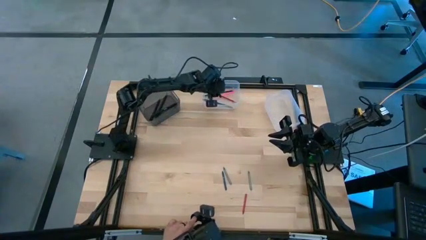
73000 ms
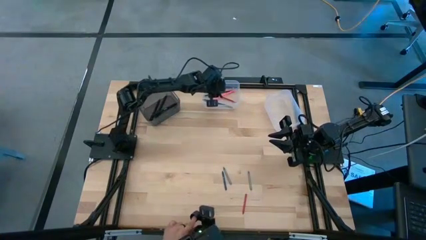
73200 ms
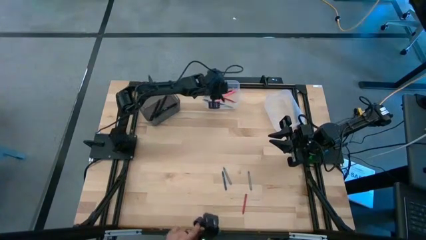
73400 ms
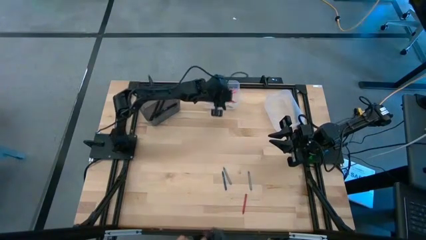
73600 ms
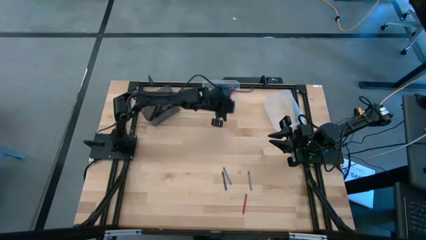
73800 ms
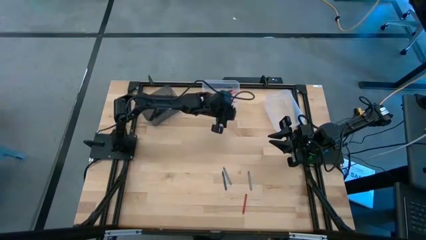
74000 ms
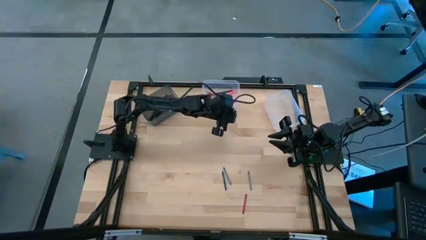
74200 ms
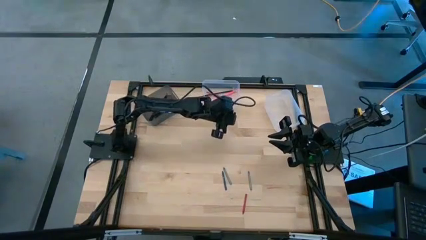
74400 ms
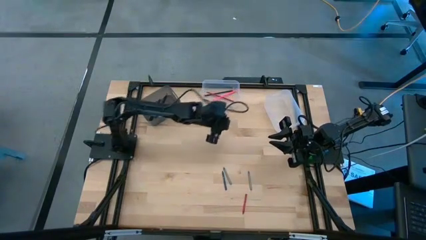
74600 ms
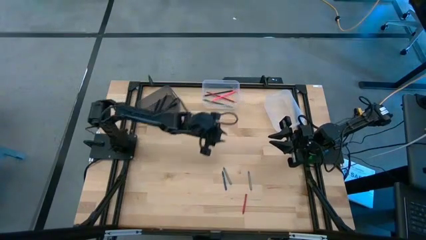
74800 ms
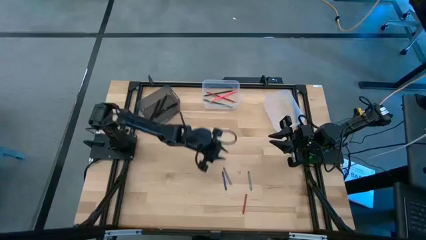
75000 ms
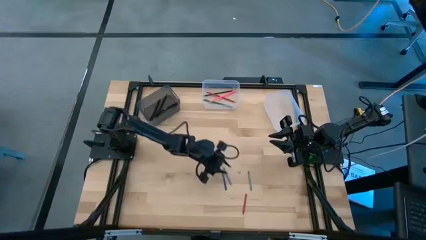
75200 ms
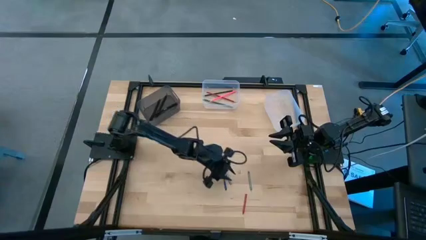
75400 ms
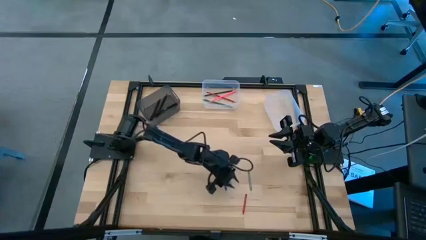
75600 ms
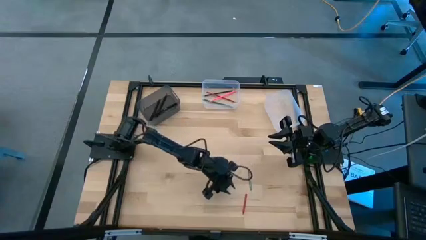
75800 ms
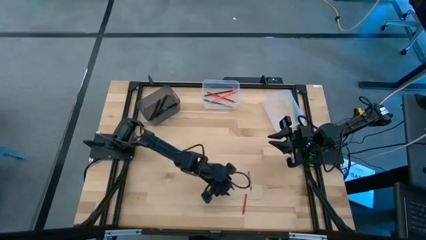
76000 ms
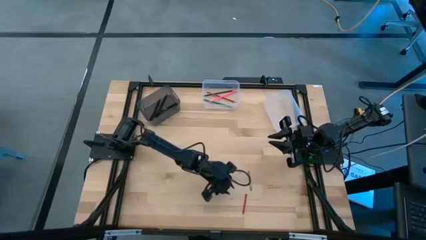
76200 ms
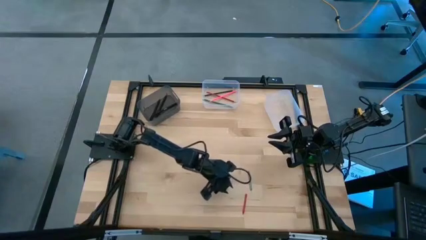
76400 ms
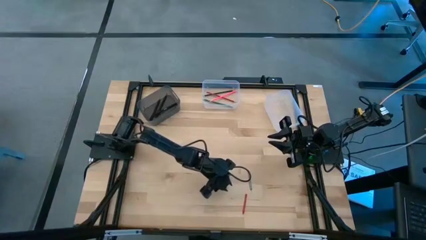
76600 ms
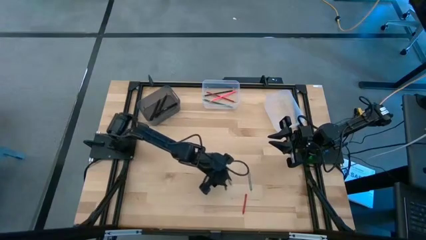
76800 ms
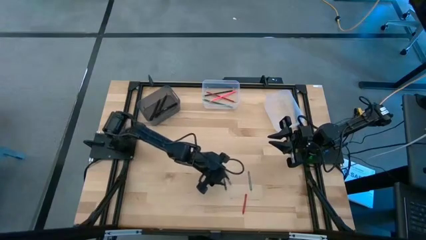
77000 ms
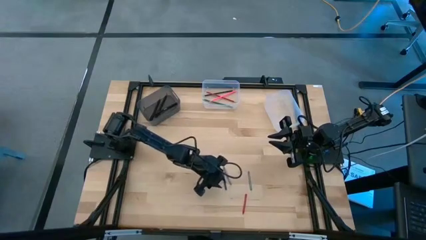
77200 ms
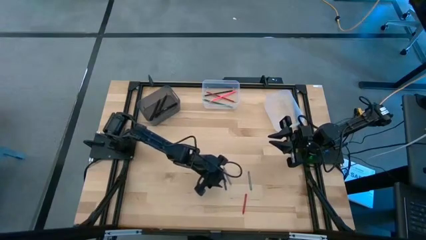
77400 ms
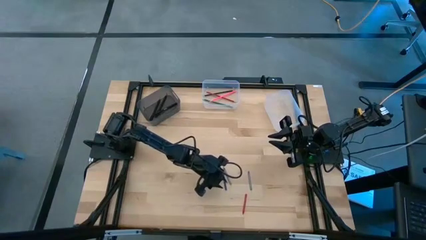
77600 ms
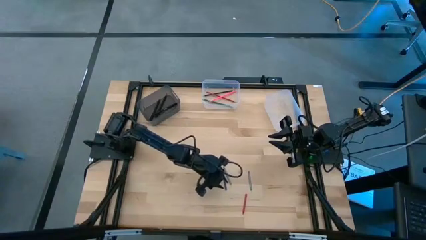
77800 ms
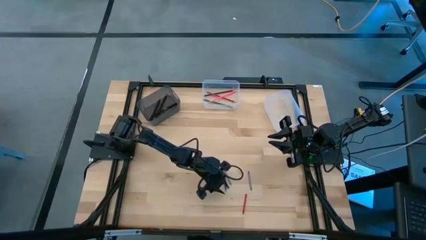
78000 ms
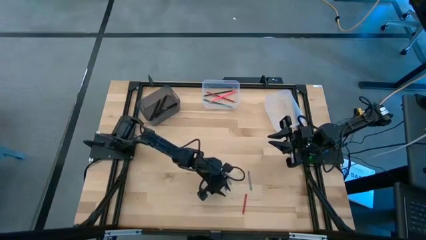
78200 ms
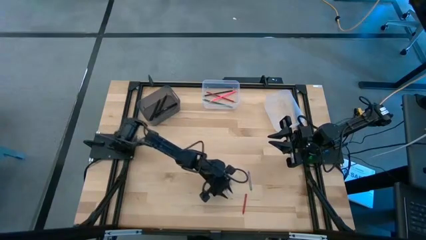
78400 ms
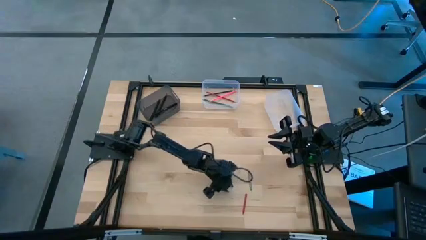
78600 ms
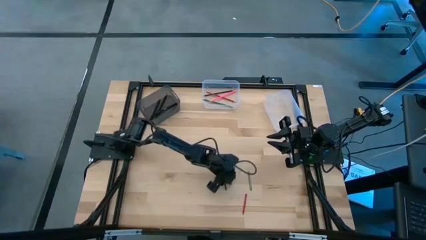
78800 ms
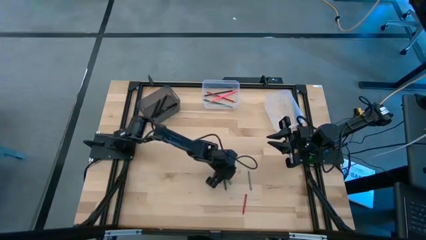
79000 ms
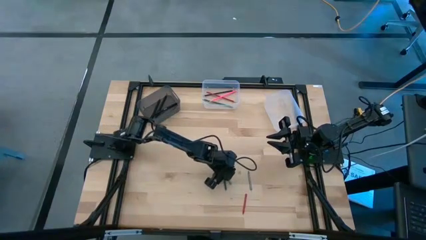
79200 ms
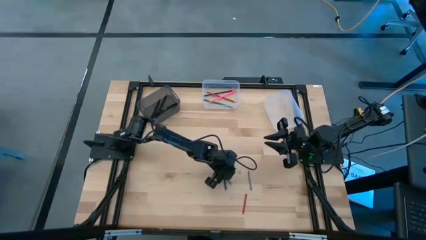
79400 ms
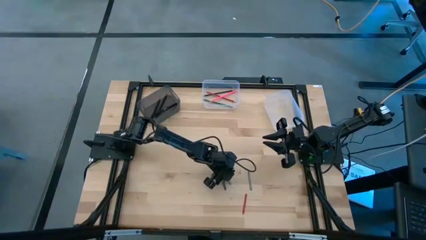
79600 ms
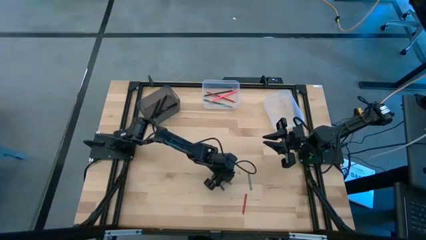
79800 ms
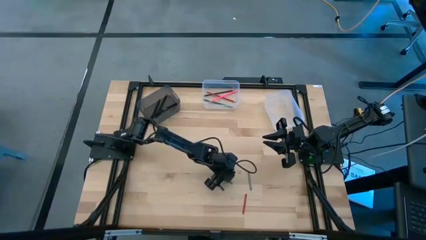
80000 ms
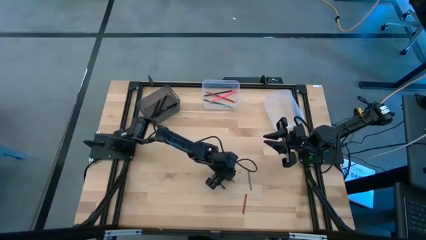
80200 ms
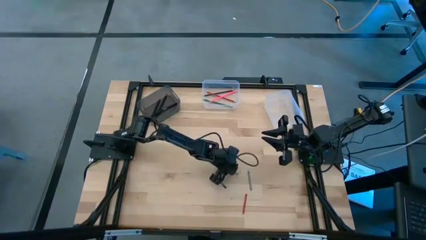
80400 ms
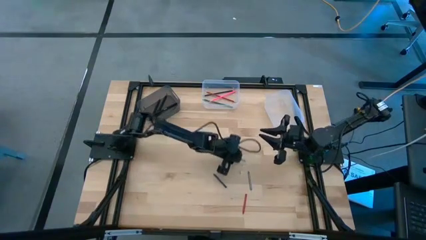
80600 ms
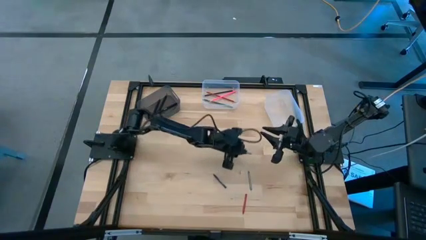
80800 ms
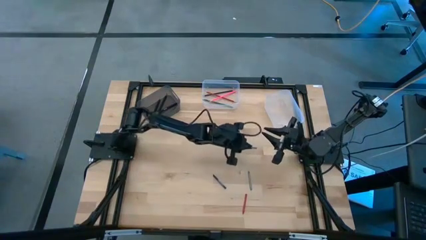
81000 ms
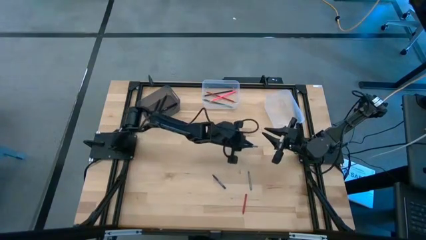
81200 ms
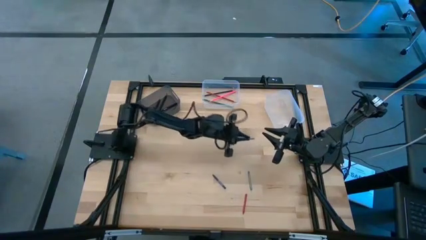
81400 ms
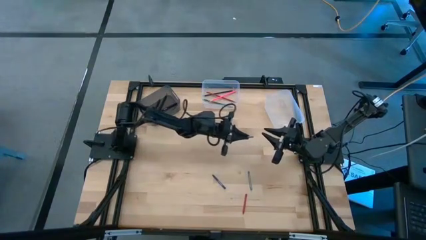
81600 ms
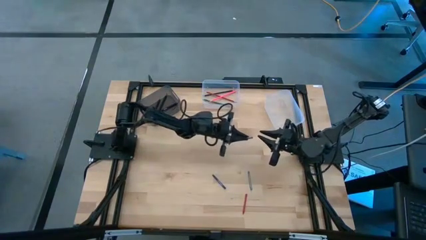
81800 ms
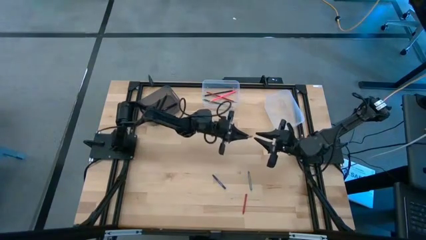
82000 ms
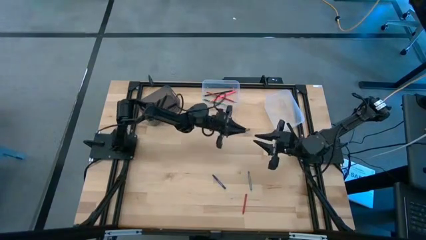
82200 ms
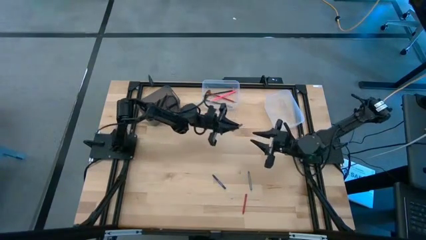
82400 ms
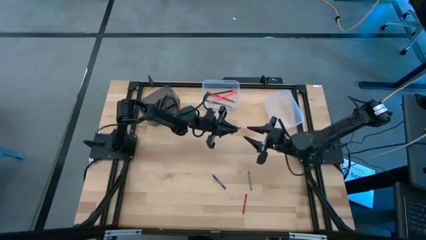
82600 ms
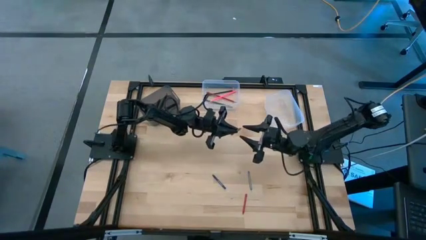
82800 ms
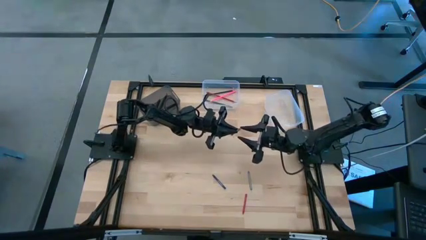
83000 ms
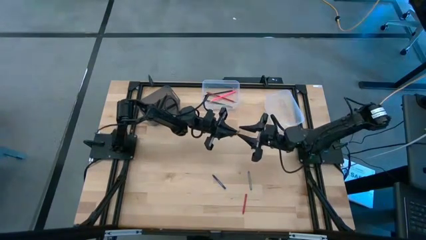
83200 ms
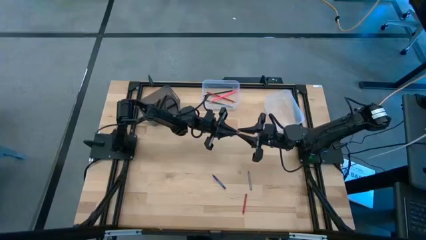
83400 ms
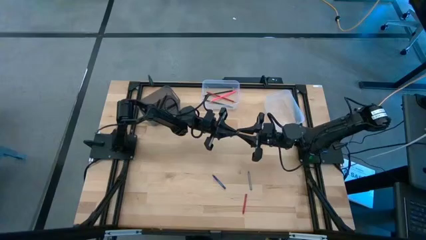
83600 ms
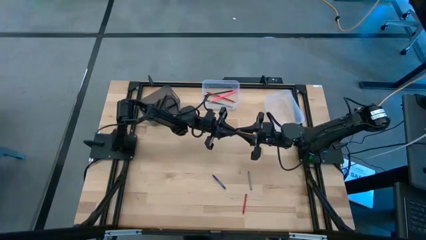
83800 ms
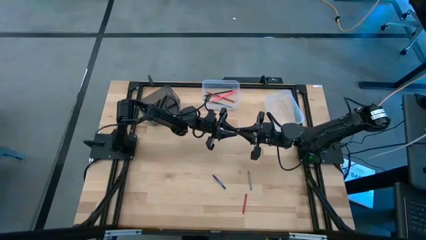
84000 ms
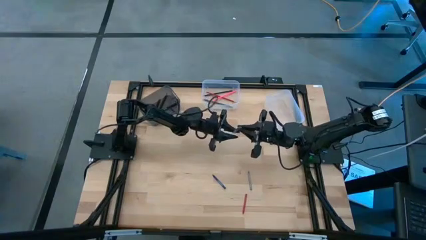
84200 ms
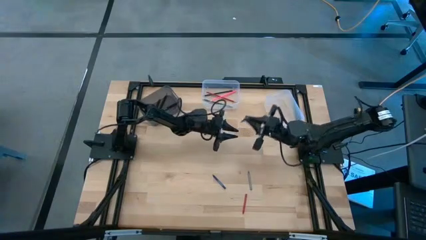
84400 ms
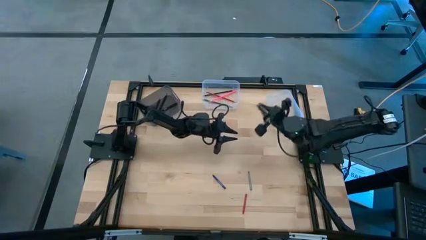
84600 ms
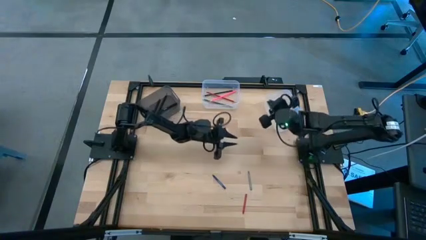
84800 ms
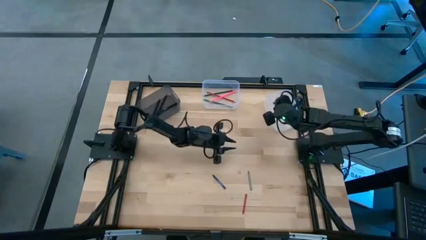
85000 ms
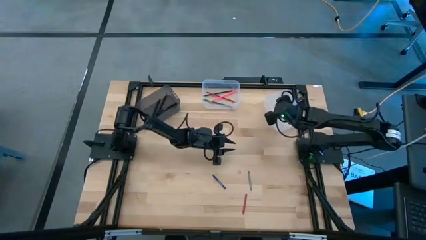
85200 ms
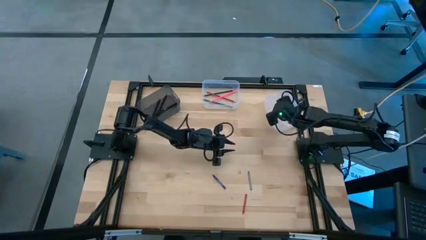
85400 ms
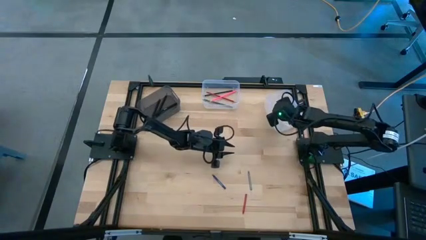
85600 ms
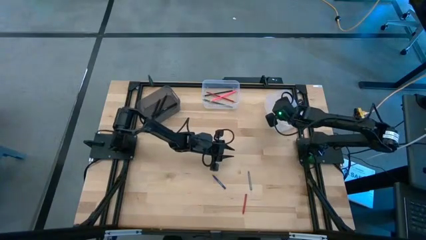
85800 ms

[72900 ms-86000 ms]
Task: Sort crayons/erasers/pens/pencils in bins
Put the left gray crayon into the right transparent bin

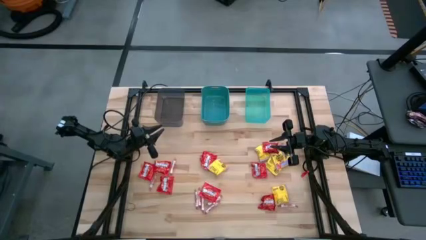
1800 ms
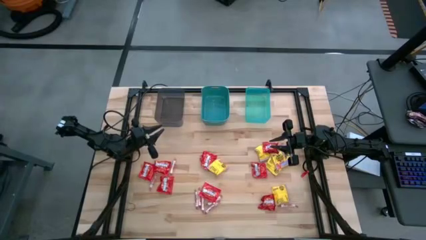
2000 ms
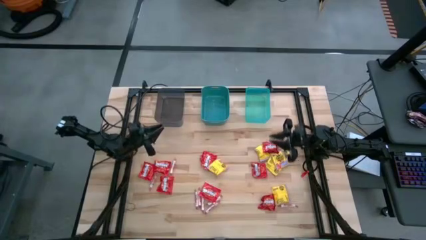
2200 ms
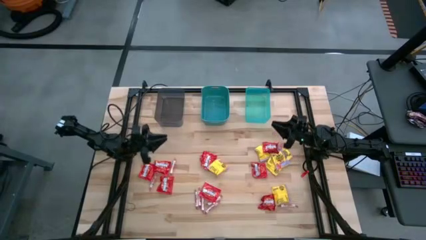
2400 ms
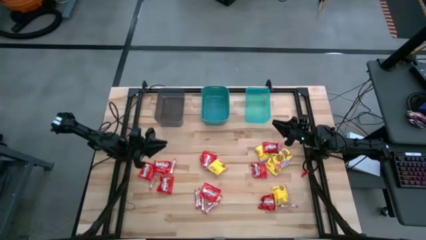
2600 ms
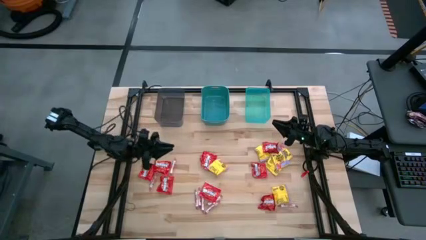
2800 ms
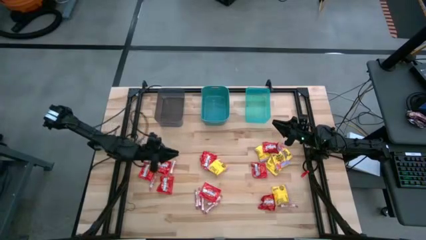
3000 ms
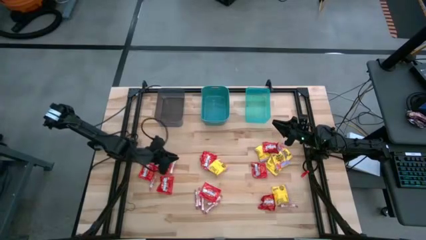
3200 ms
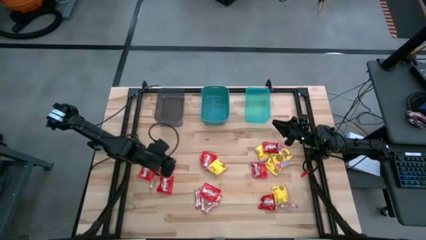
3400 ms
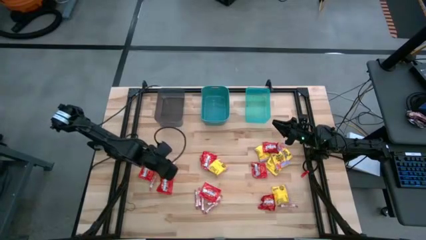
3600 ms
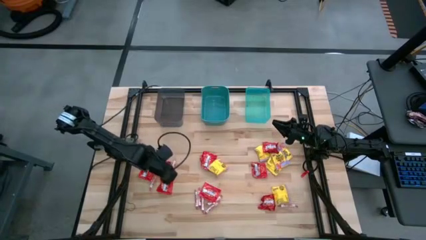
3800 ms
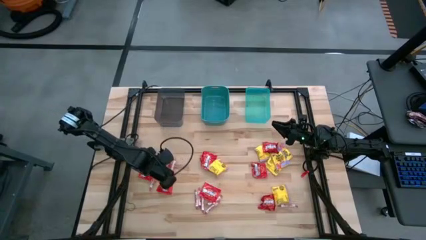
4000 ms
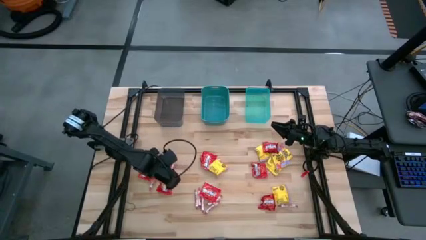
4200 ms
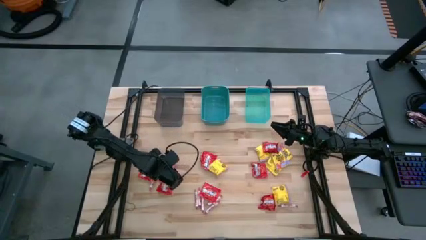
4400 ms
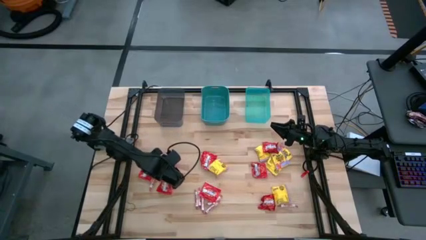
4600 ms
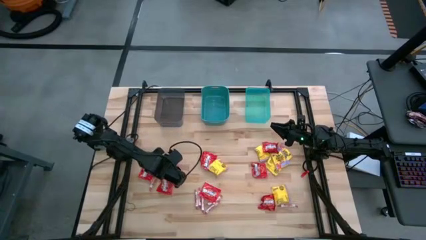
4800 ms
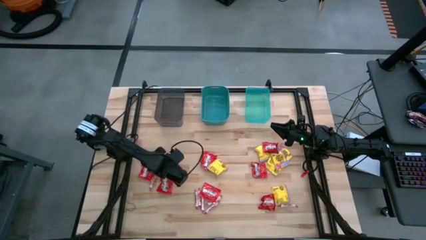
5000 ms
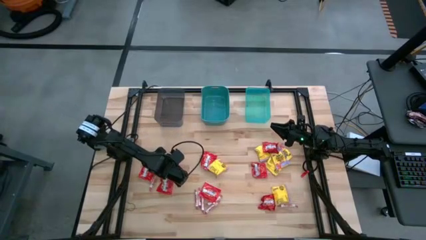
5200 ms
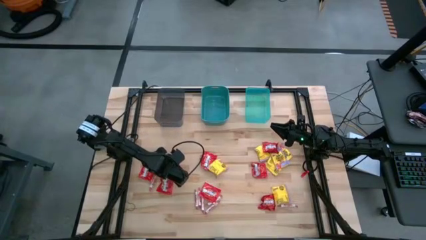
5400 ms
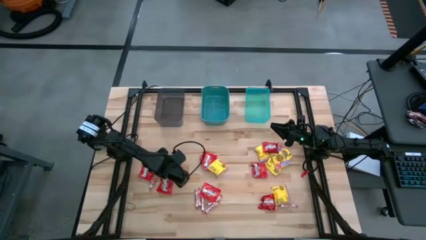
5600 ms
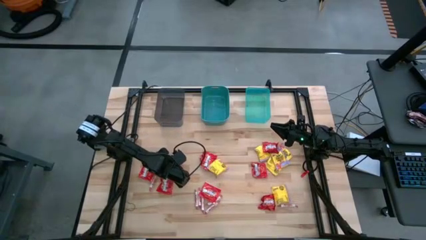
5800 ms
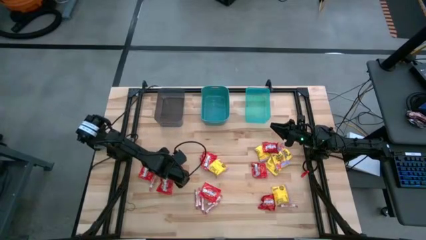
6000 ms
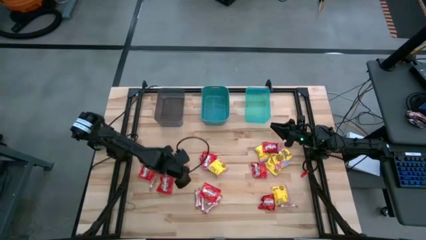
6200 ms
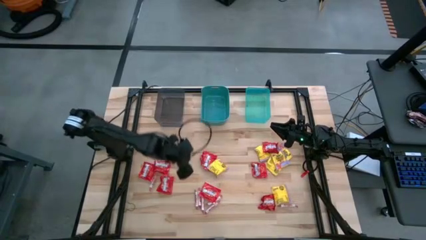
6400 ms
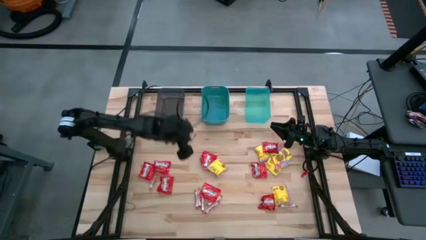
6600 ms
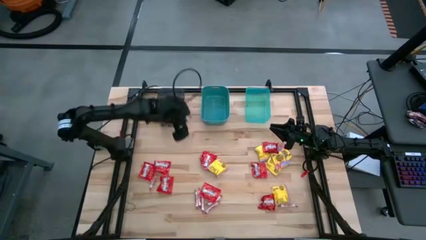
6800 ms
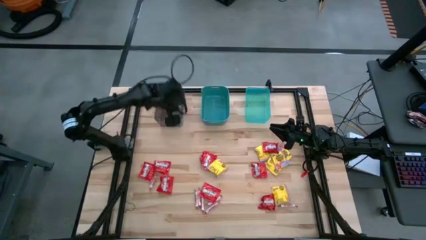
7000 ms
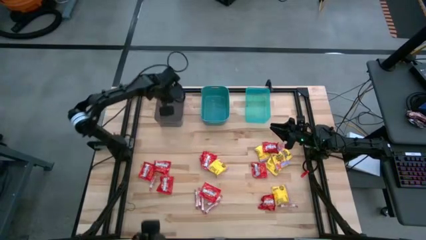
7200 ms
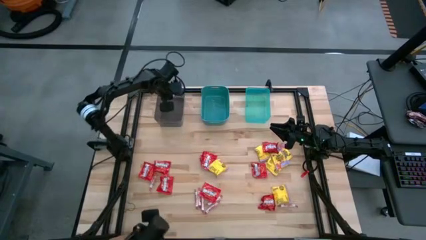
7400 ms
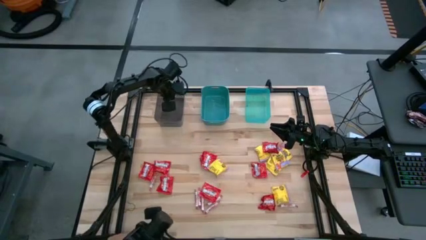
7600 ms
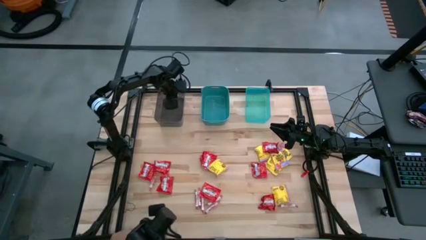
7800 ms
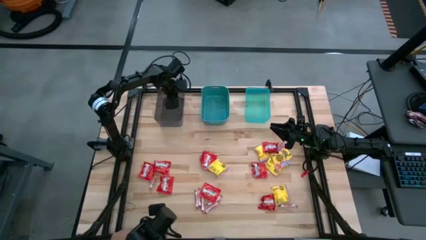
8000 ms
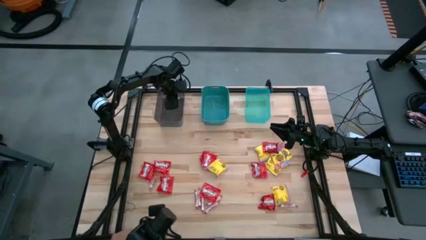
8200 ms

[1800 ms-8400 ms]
Task: Sort candy
Put the white candy on the black bin
